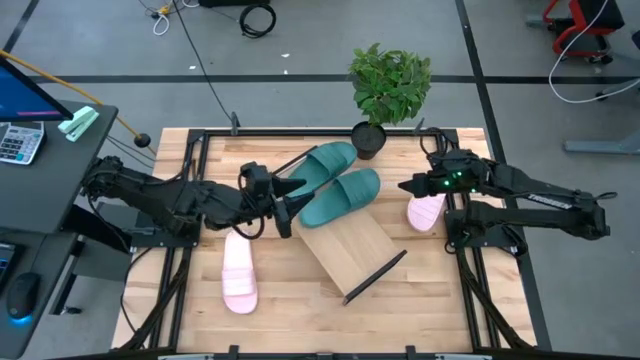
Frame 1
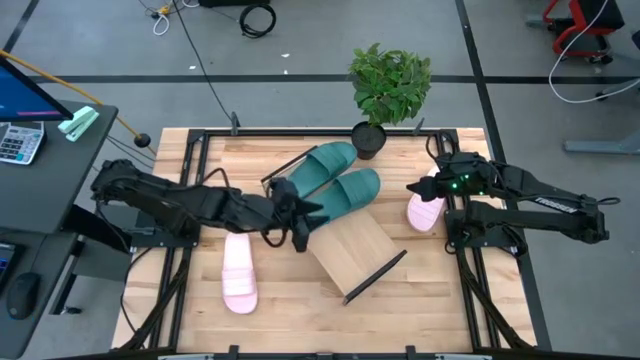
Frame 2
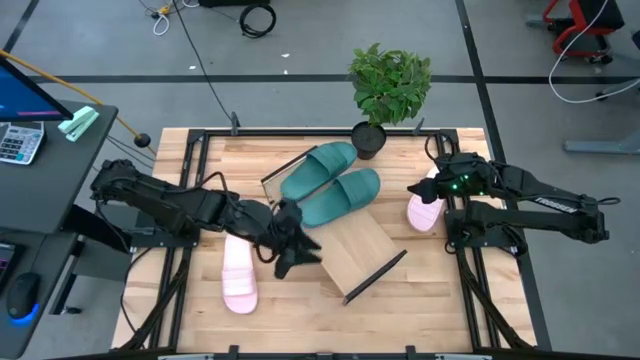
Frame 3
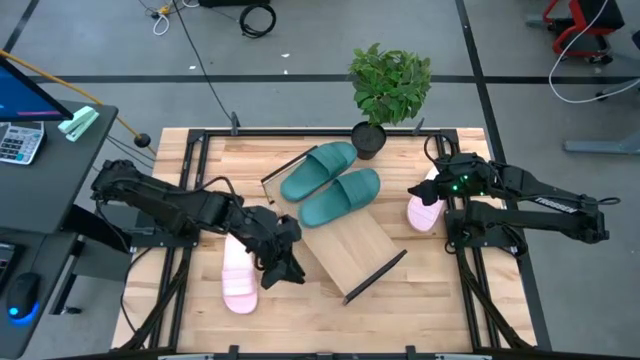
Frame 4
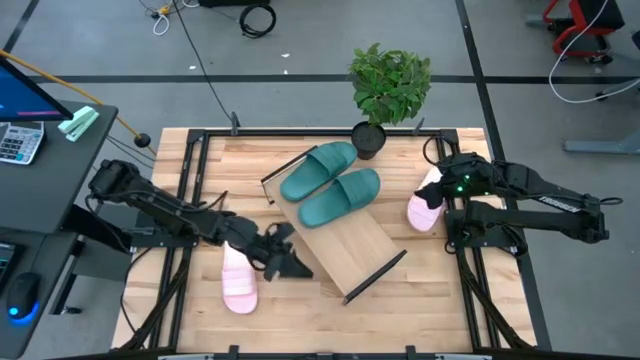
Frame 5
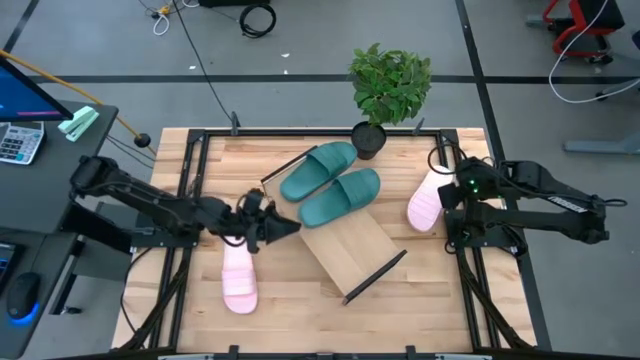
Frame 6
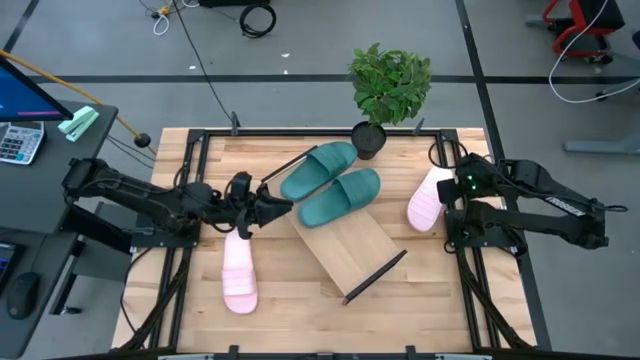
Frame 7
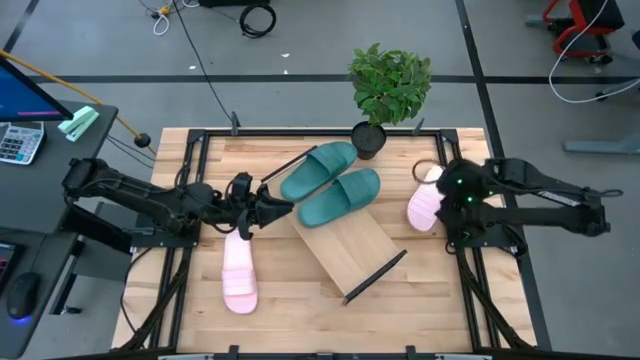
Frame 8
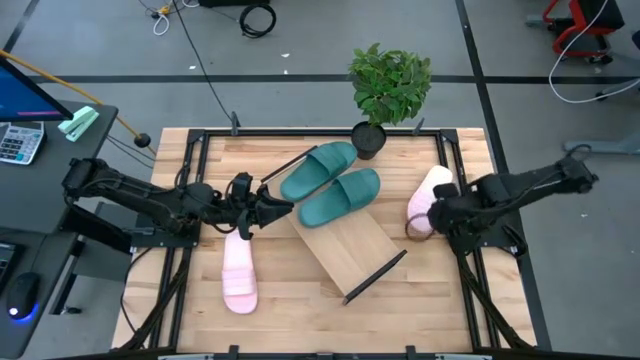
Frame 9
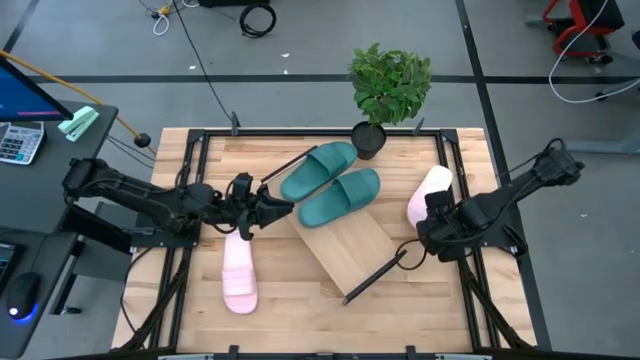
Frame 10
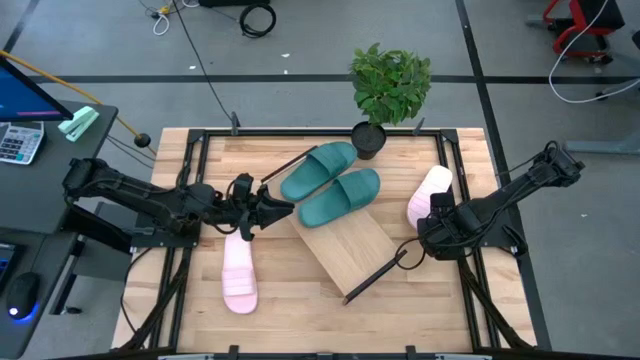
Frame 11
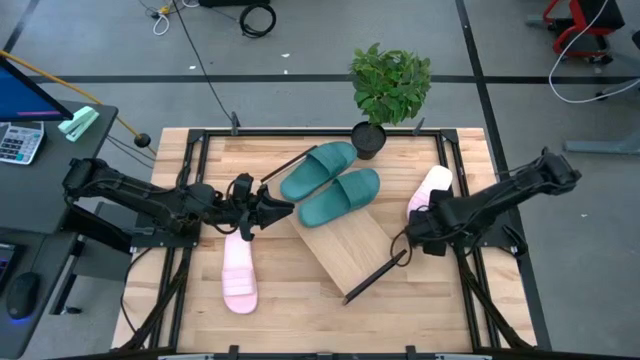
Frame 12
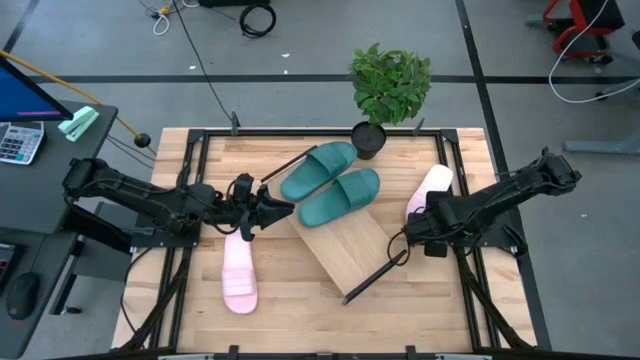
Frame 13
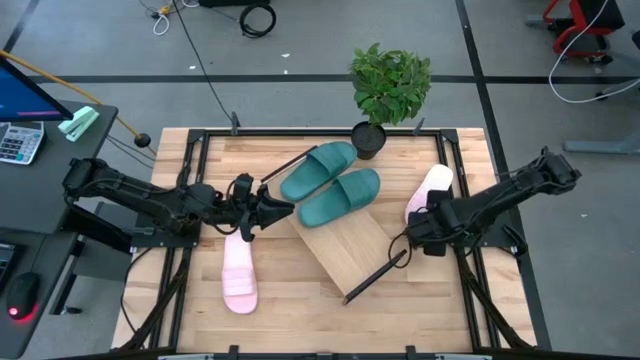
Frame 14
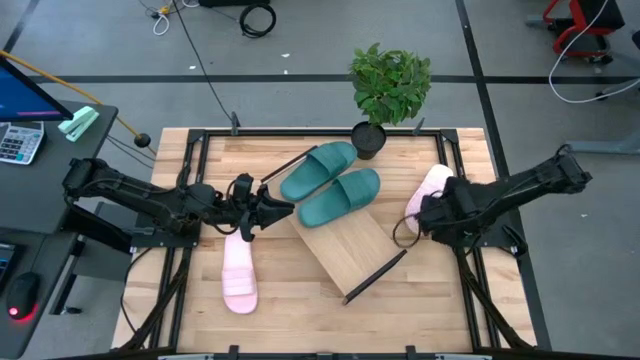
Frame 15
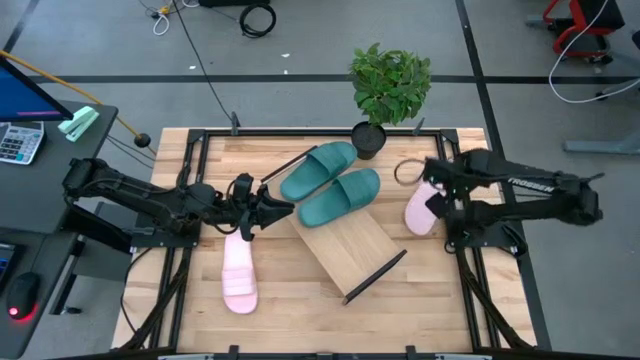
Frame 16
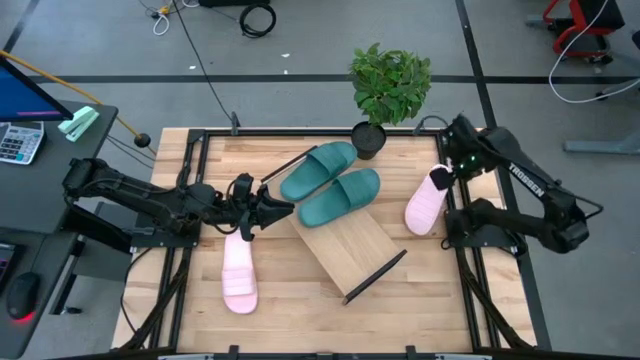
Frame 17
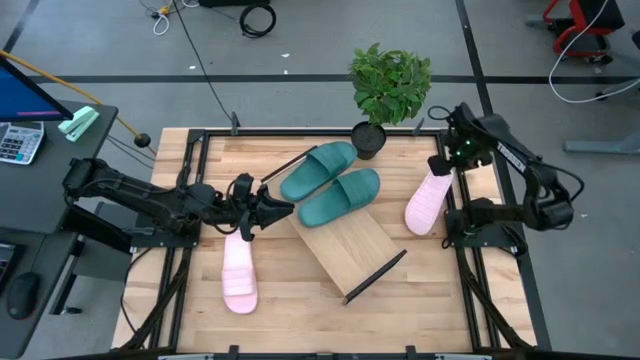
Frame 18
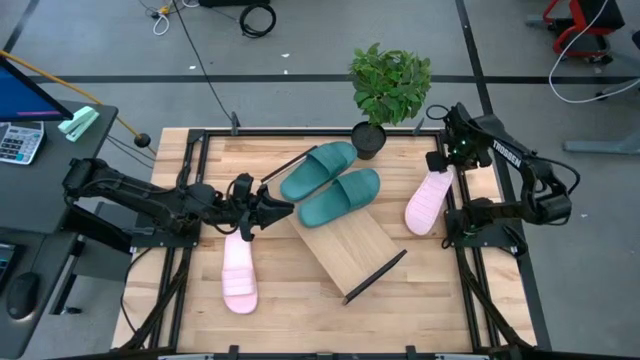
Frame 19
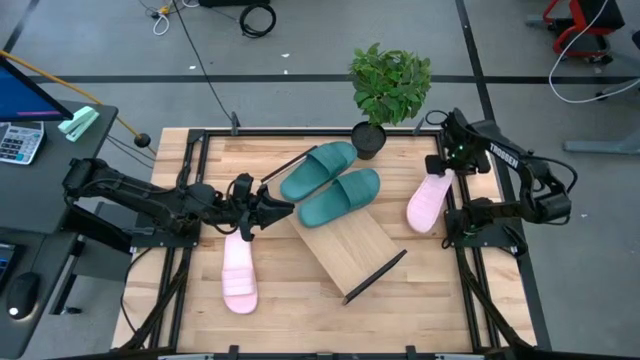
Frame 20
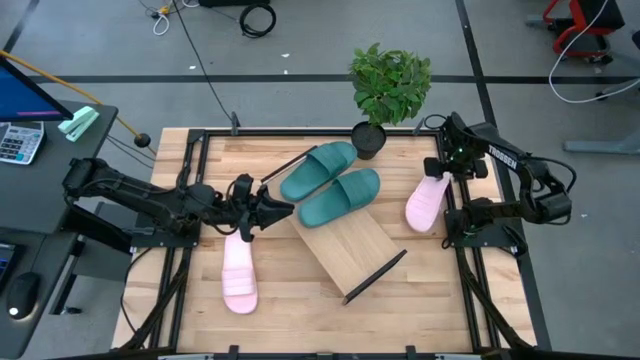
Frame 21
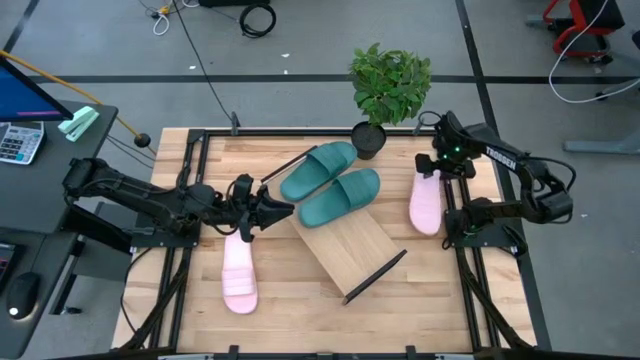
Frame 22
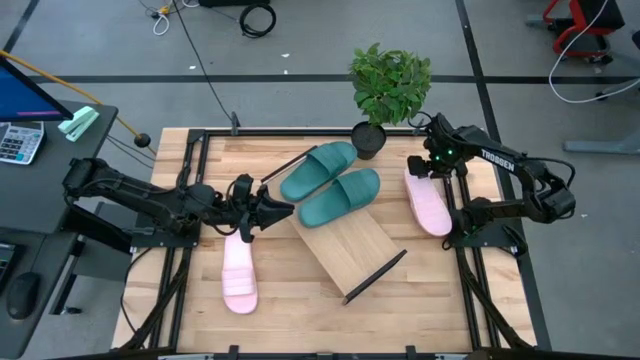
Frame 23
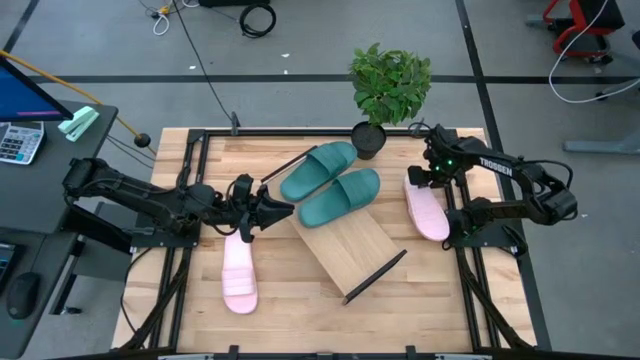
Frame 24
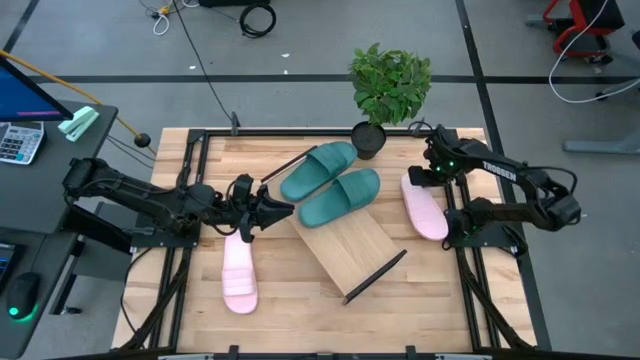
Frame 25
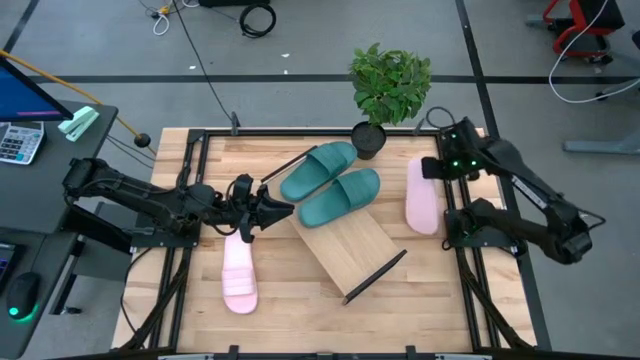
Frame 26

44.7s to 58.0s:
Task: Pick and place slides into the shelf
Put the right pink slide on the shelf

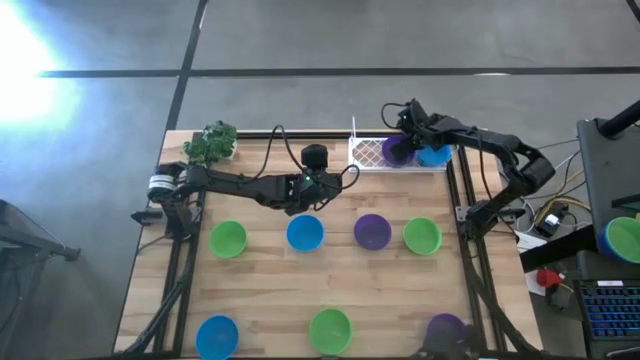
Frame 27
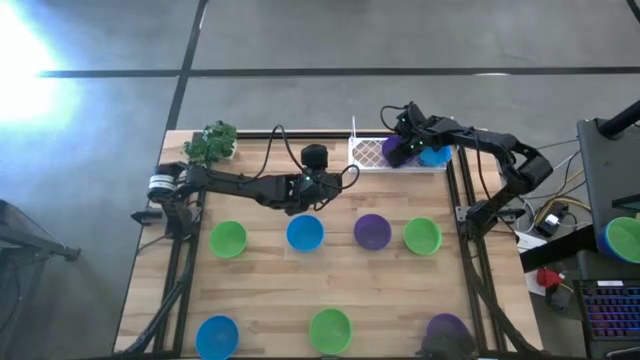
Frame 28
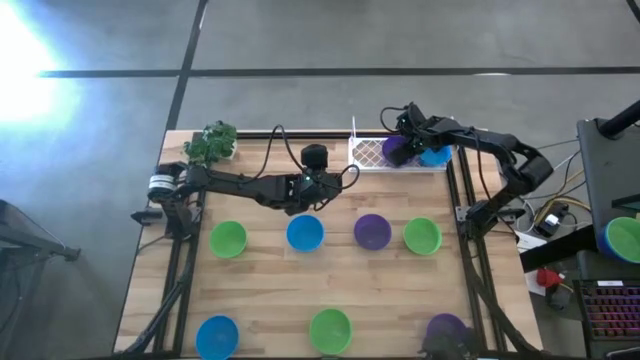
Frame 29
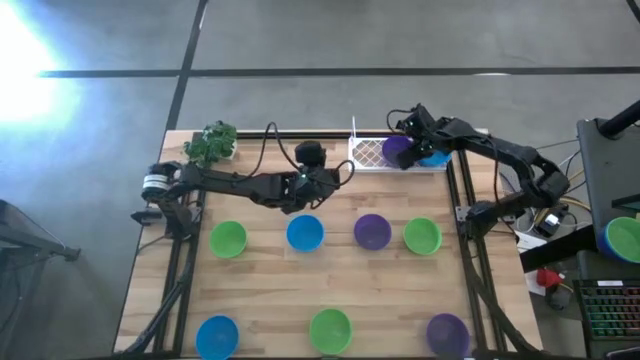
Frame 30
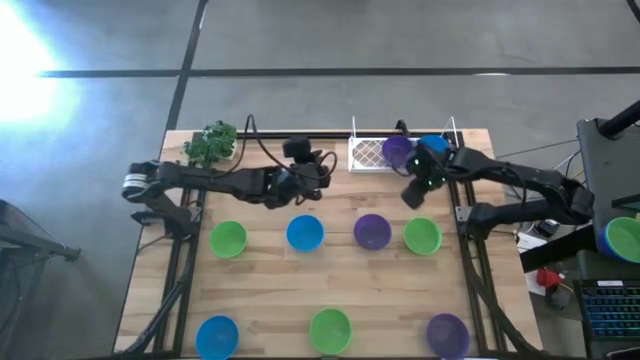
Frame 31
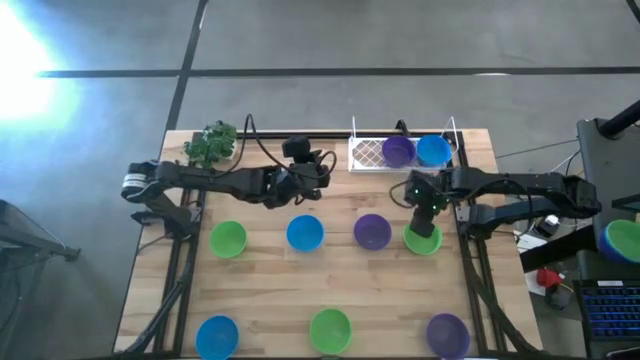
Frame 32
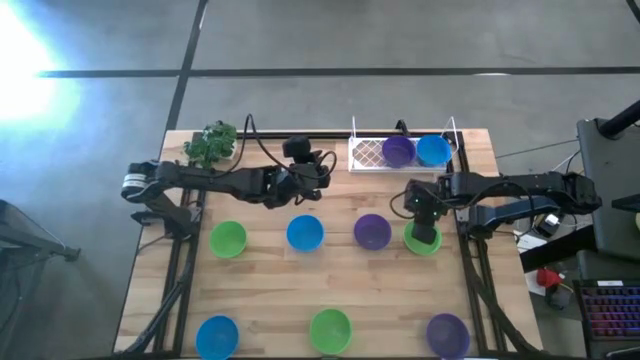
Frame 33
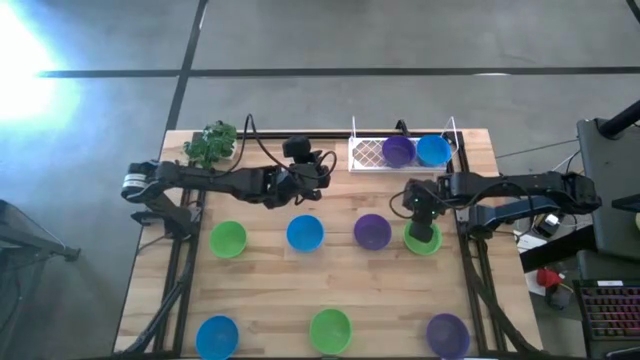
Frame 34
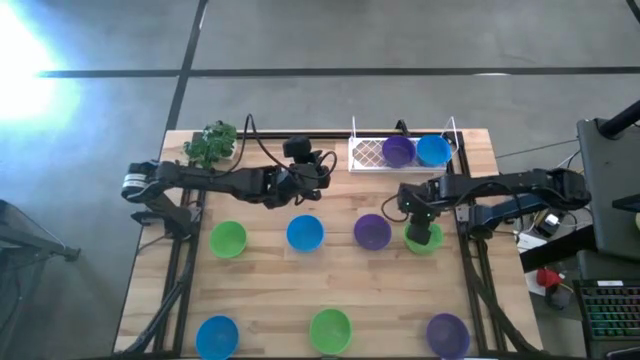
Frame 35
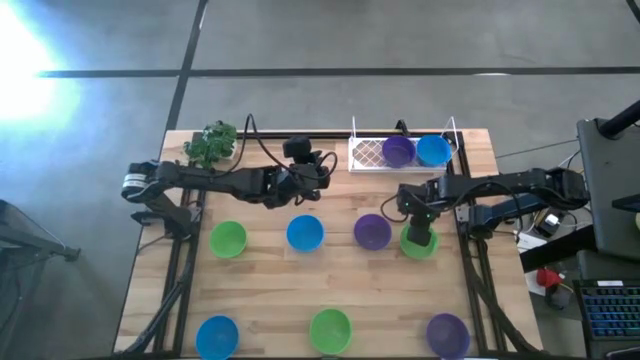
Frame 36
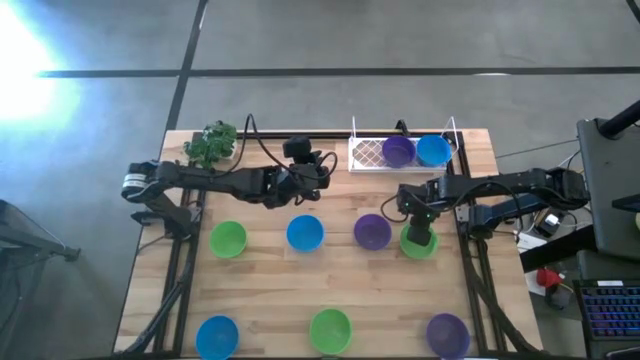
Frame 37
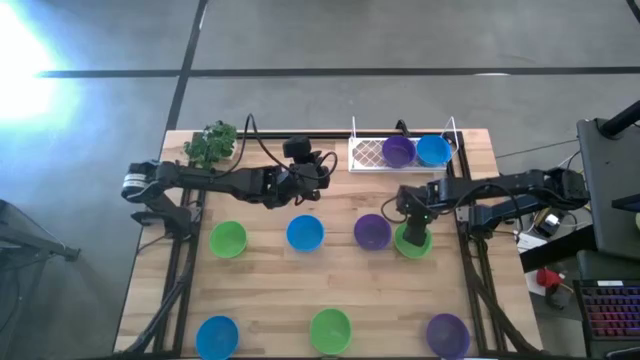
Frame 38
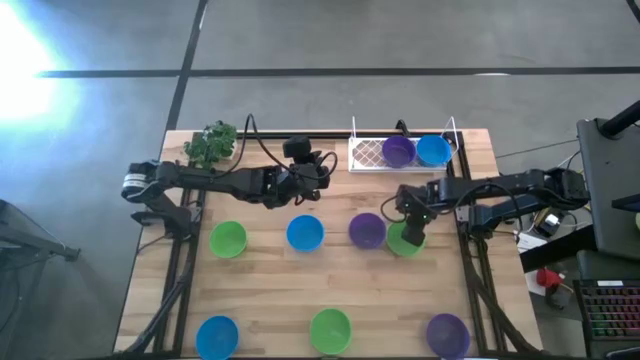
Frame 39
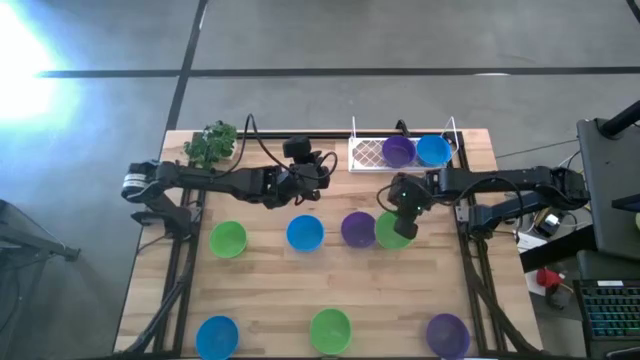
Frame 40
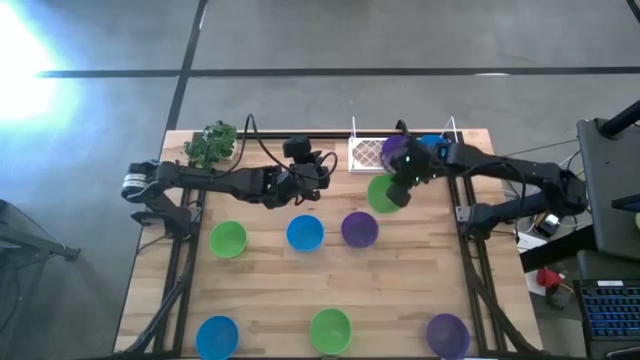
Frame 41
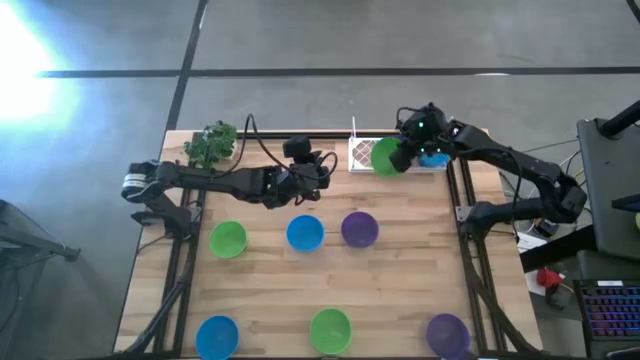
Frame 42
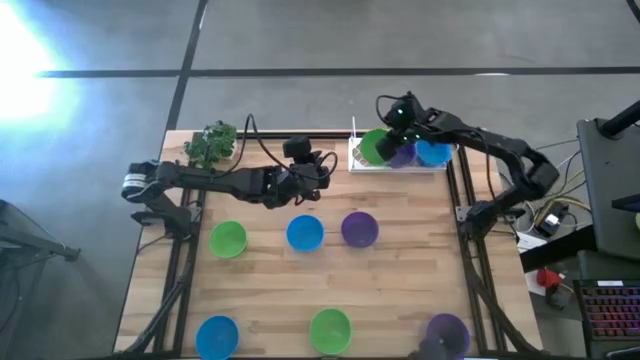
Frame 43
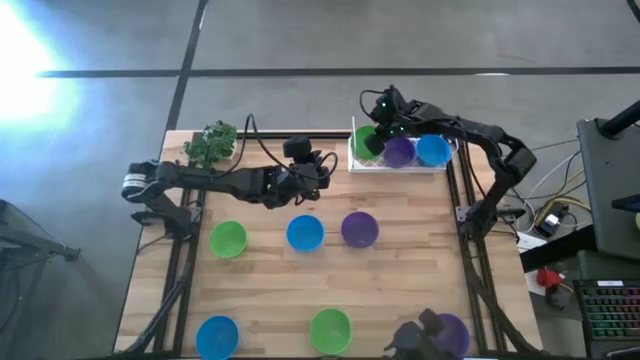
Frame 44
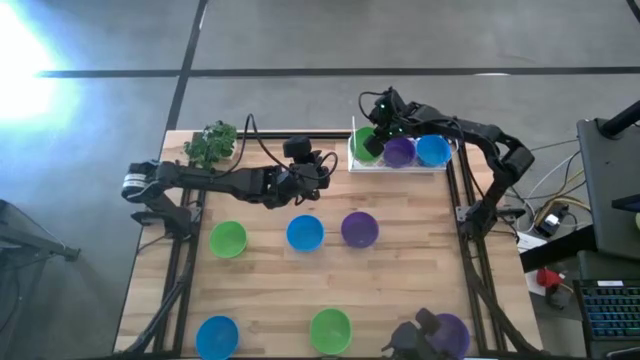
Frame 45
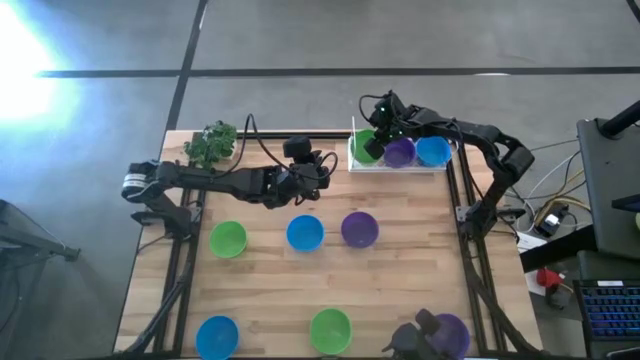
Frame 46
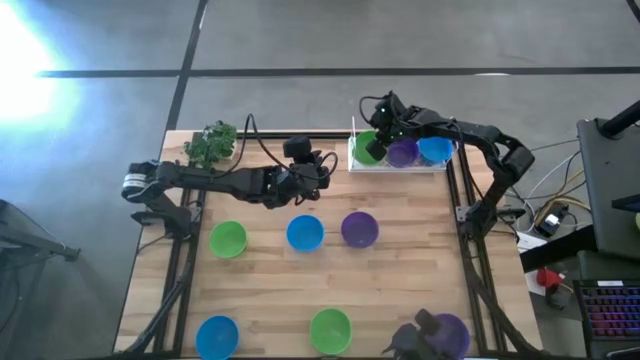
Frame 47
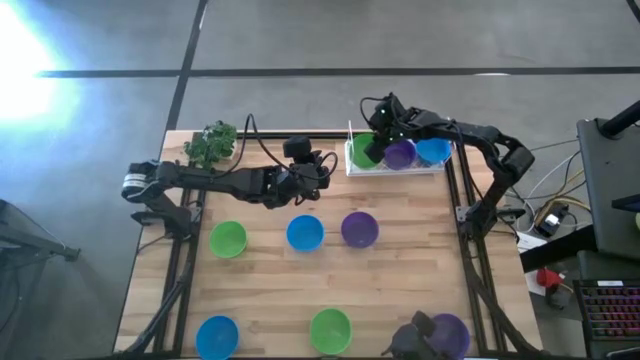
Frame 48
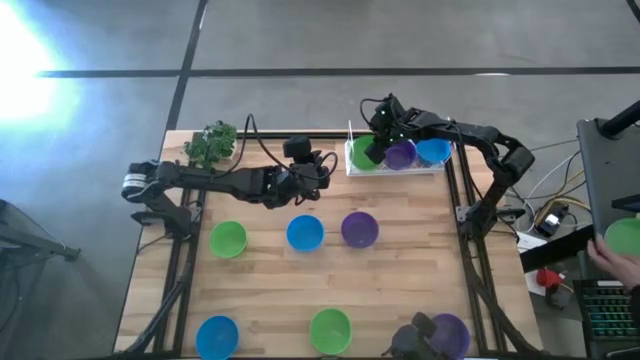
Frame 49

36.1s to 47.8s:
Task: Pick & Place Mini bowls
Put the top right green bowl on the shelf
